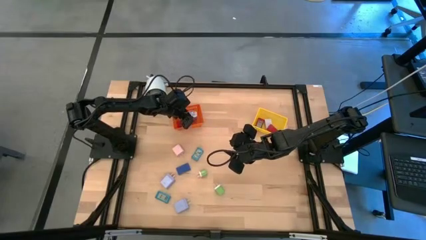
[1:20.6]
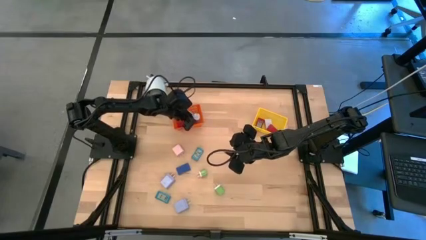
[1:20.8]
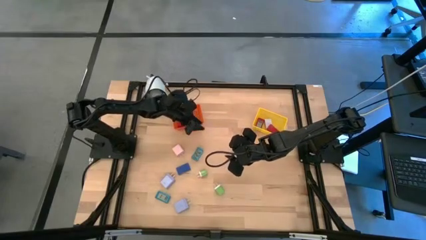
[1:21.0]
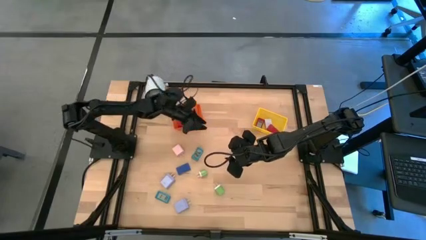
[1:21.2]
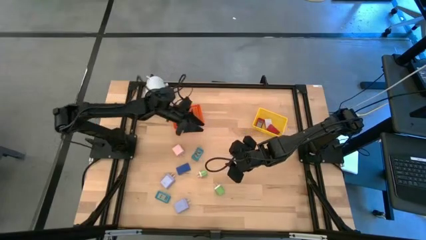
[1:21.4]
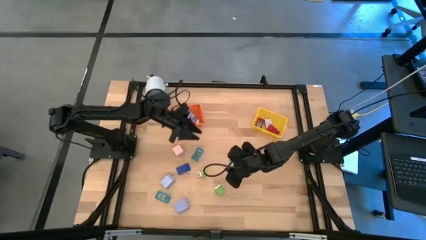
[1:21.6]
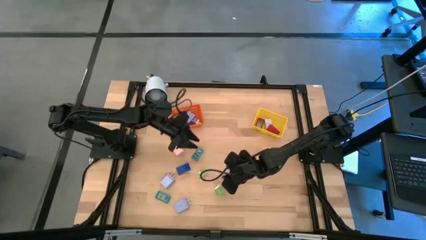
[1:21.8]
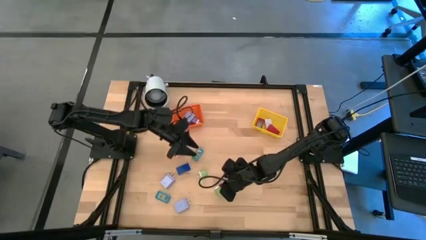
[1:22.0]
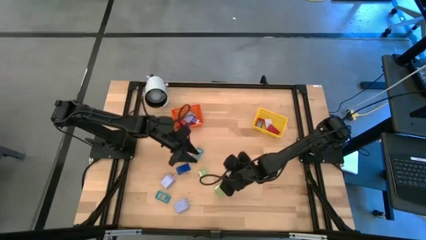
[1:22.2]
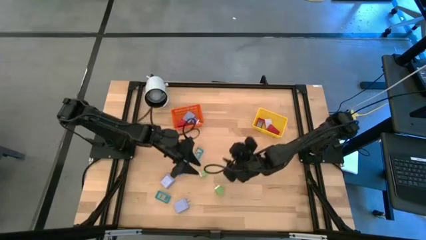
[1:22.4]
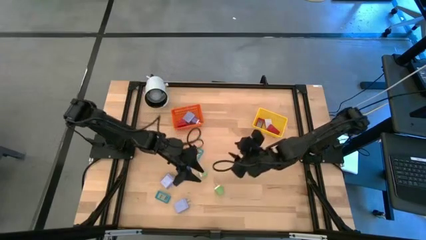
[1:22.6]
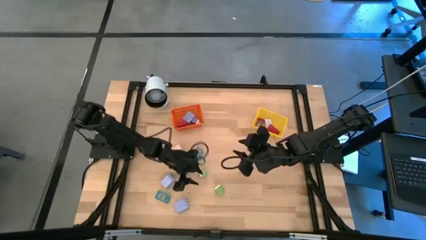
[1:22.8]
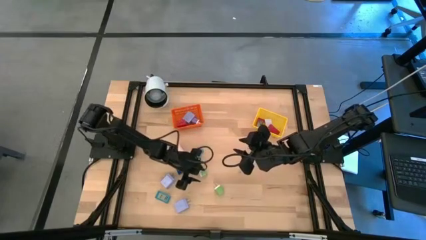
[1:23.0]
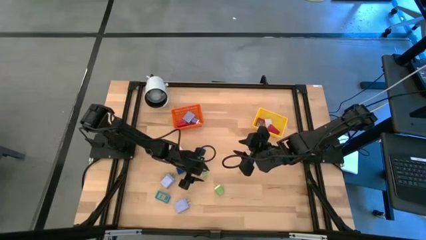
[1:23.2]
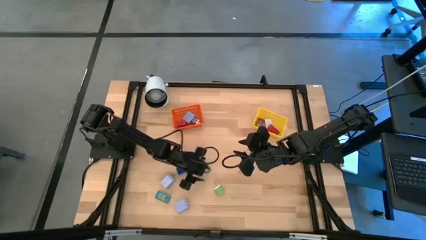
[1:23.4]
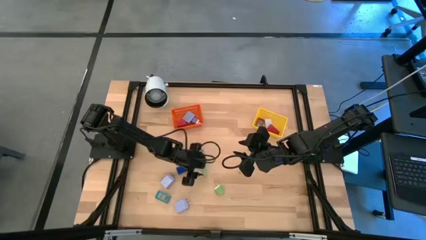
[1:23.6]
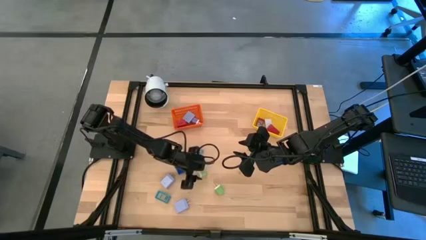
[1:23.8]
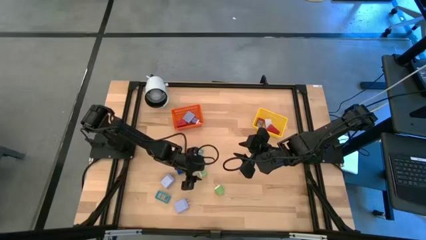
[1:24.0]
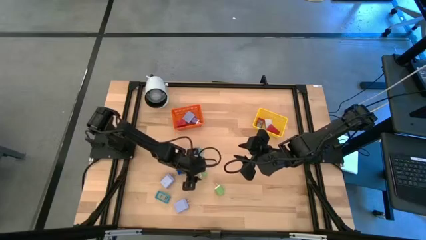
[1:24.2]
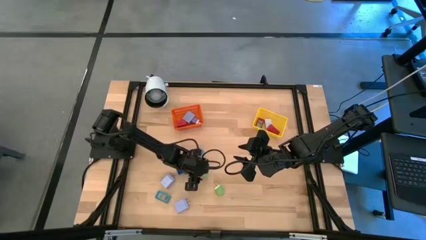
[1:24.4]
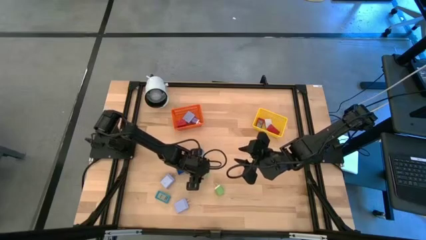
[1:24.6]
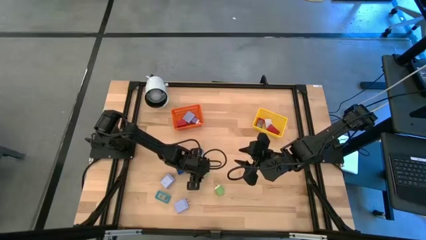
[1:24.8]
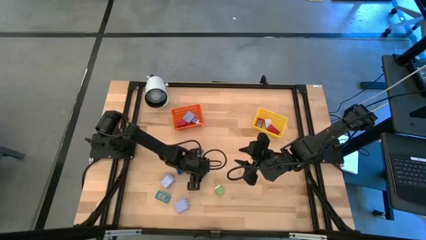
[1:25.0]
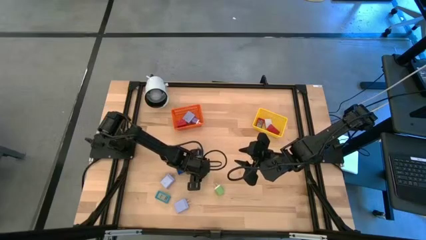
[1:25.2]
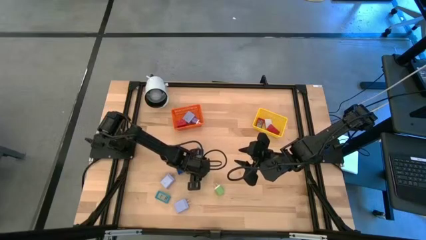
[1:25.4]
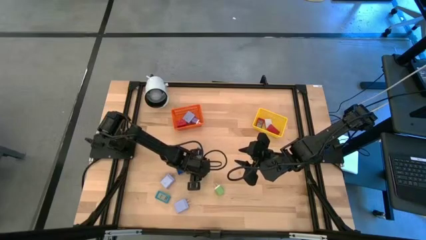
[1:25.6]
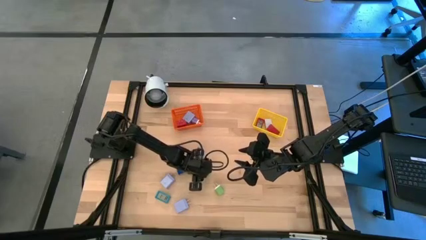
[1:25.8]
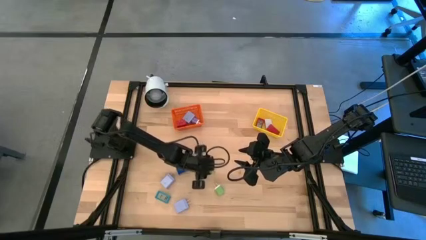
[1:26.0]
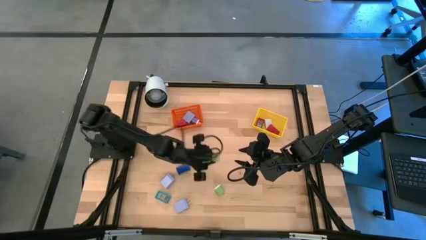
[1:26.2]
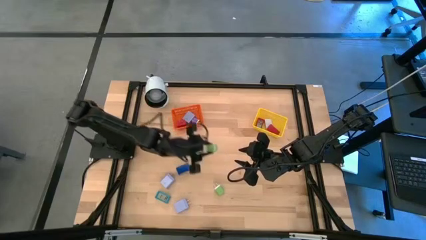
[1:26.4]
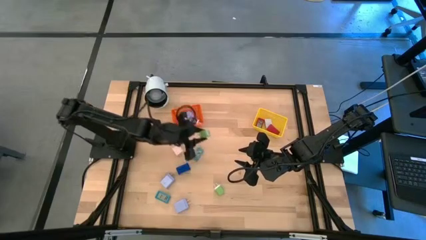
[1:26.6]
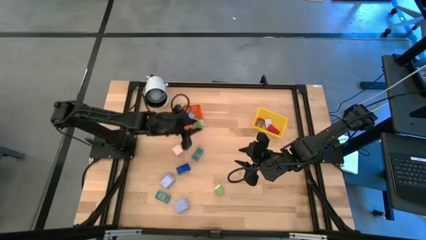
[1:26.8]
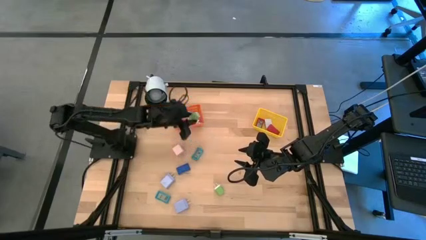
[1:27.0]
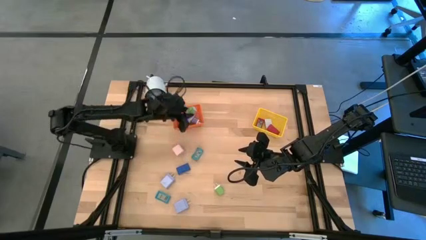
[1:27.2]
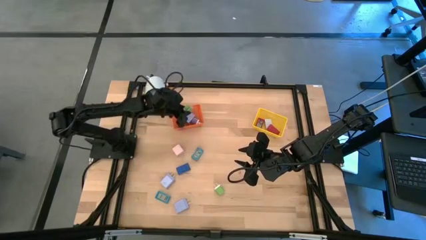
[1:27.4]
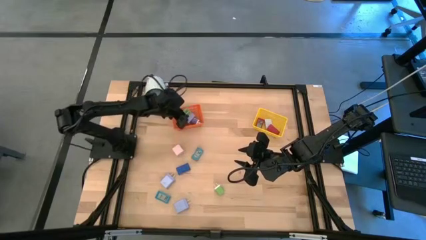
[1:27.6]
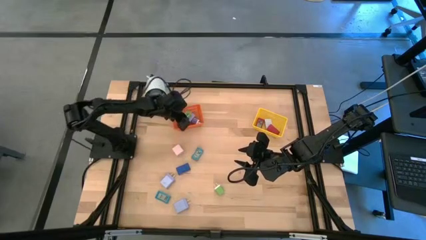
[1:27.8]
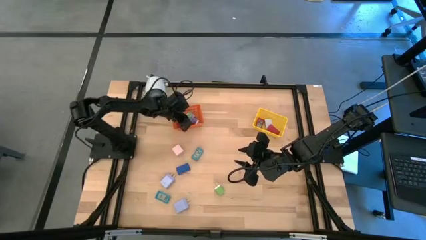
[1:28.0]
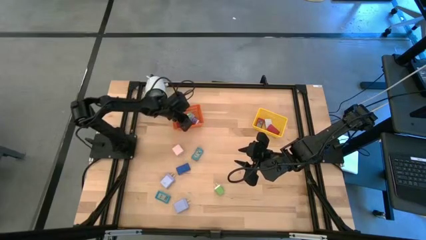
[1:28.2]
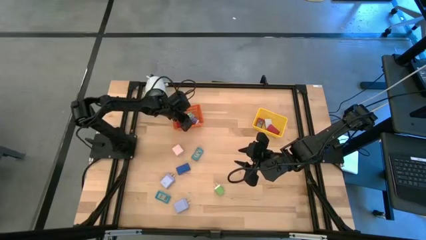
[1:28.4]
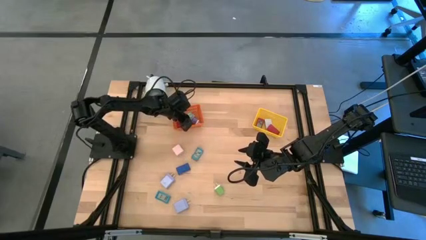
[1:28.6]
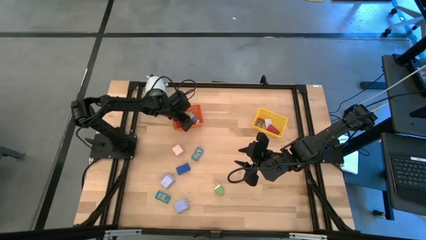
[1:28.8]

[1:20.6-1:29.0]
Task: Pick & Place Office items
Put the top green charger adapter into the orange bin

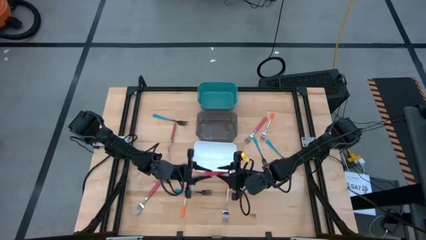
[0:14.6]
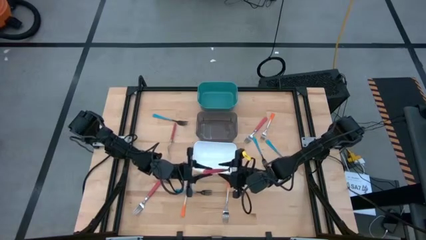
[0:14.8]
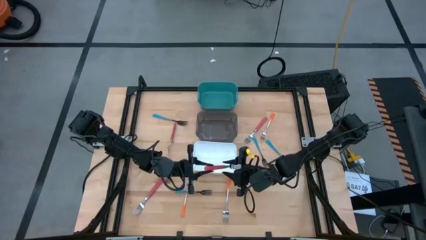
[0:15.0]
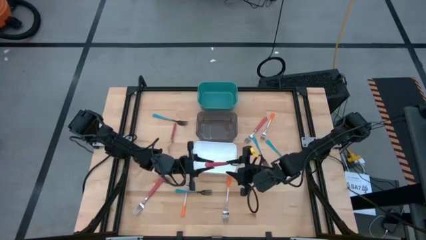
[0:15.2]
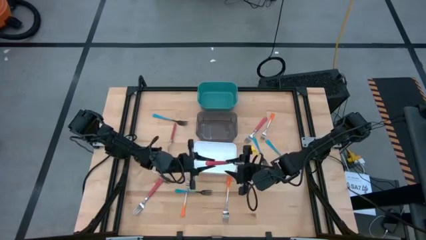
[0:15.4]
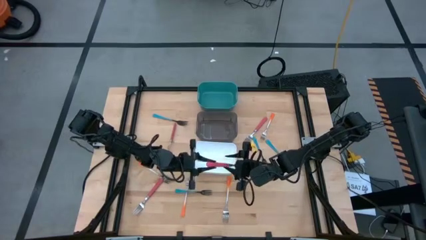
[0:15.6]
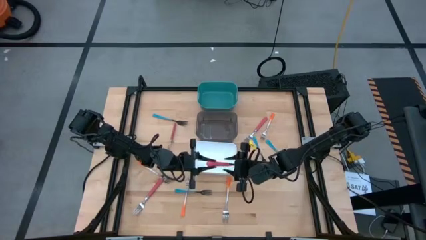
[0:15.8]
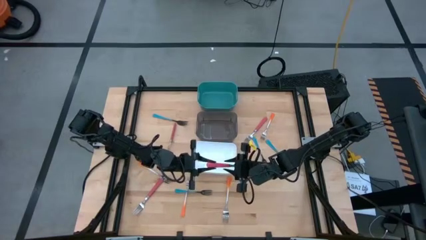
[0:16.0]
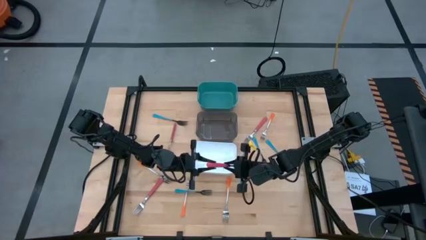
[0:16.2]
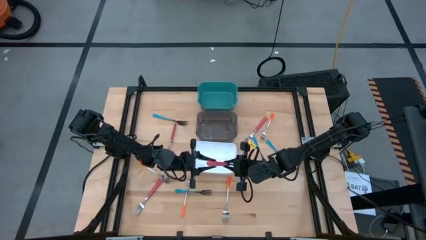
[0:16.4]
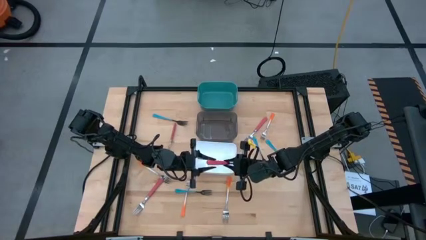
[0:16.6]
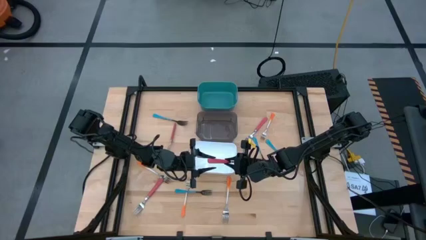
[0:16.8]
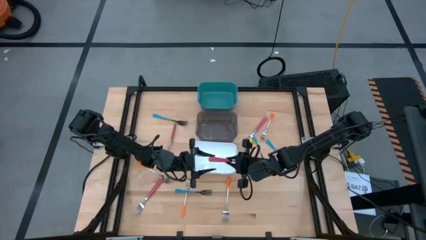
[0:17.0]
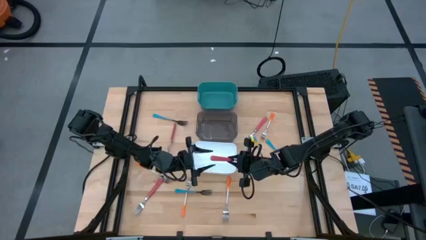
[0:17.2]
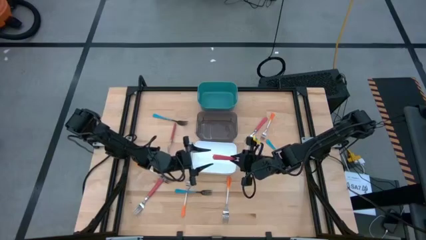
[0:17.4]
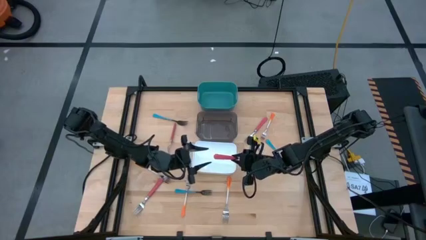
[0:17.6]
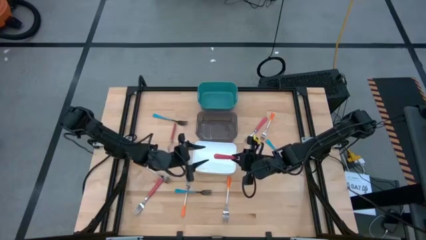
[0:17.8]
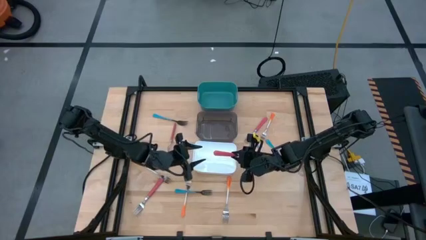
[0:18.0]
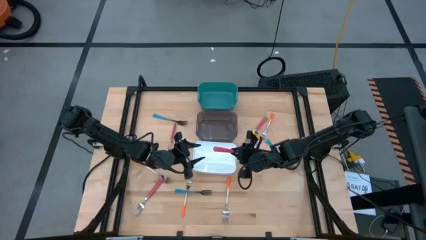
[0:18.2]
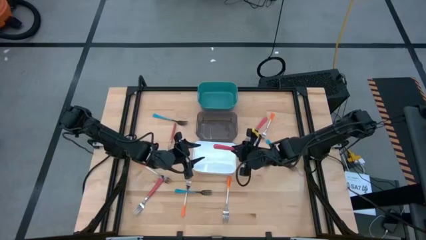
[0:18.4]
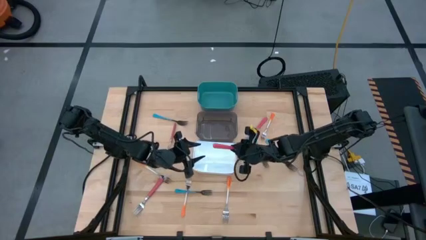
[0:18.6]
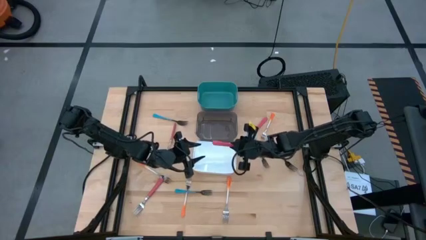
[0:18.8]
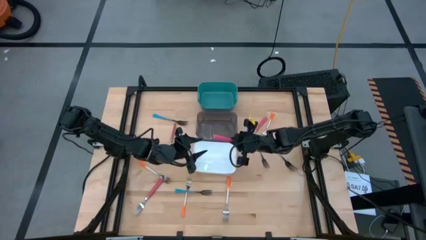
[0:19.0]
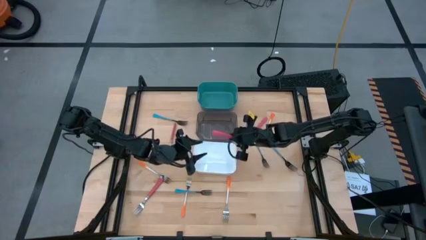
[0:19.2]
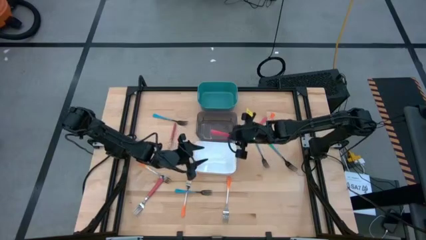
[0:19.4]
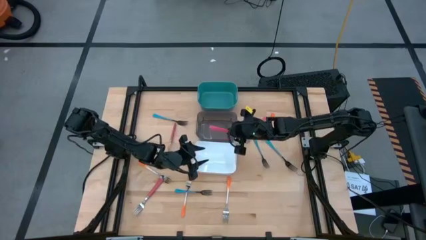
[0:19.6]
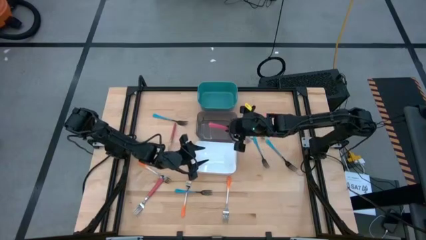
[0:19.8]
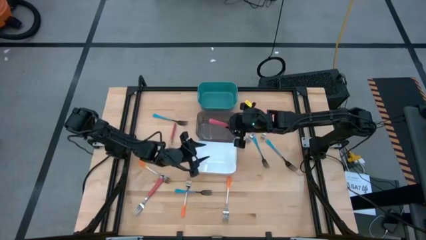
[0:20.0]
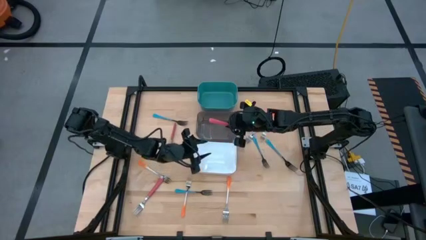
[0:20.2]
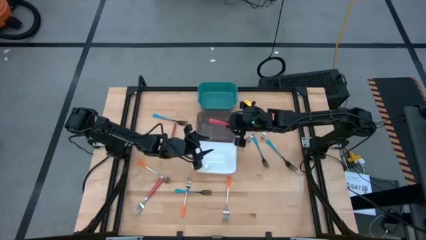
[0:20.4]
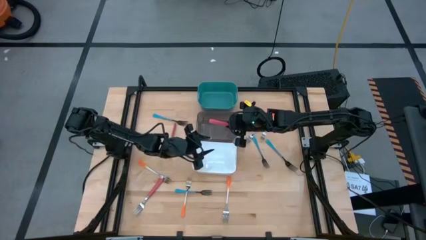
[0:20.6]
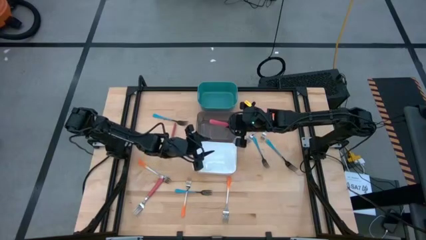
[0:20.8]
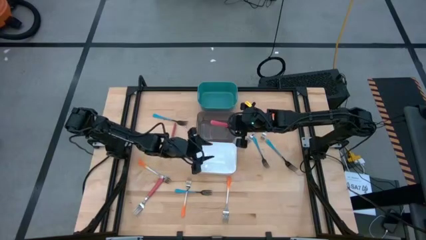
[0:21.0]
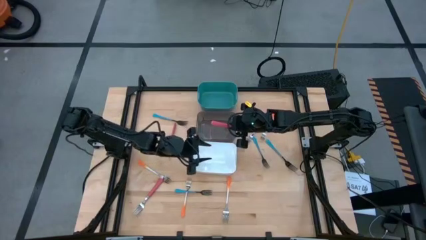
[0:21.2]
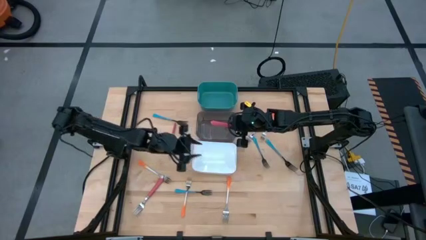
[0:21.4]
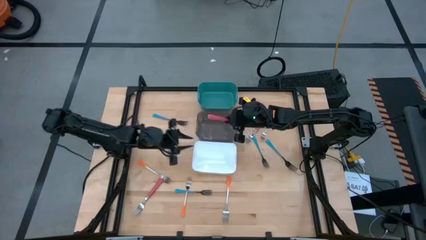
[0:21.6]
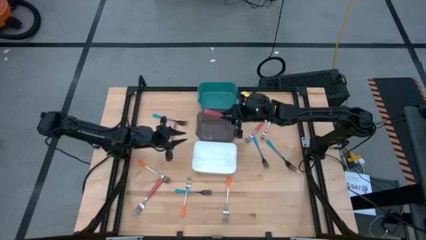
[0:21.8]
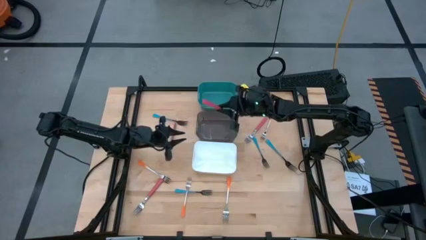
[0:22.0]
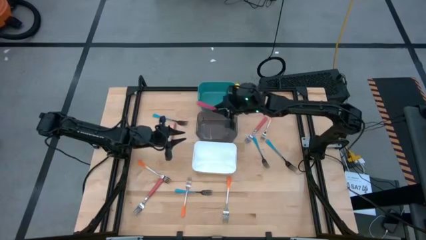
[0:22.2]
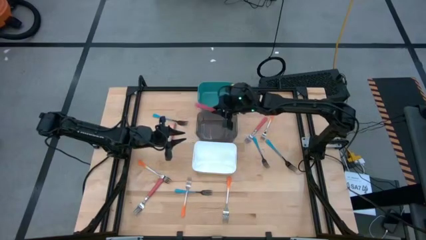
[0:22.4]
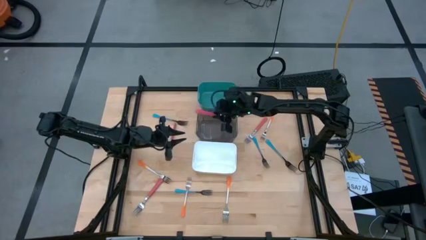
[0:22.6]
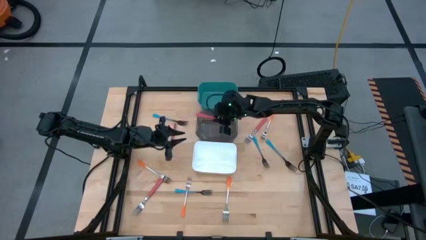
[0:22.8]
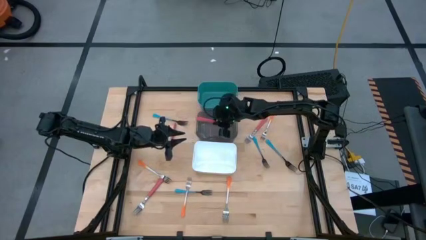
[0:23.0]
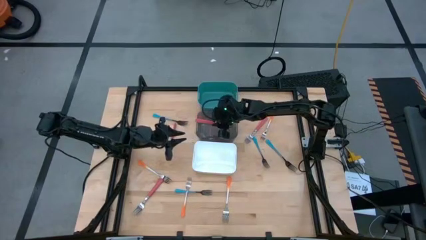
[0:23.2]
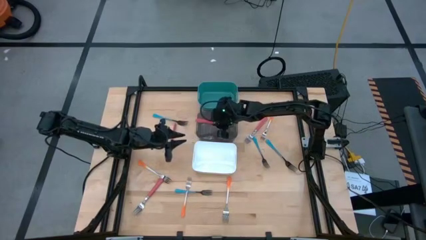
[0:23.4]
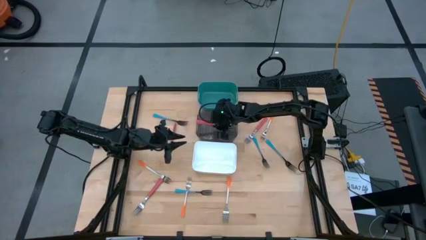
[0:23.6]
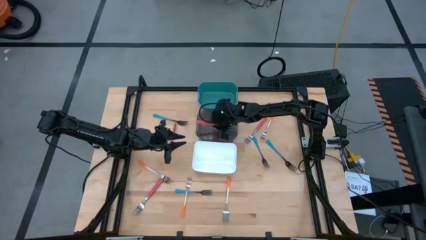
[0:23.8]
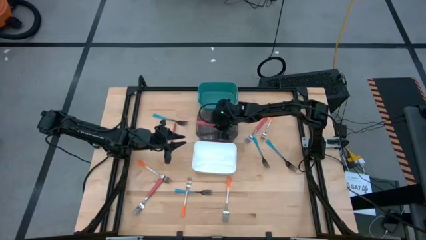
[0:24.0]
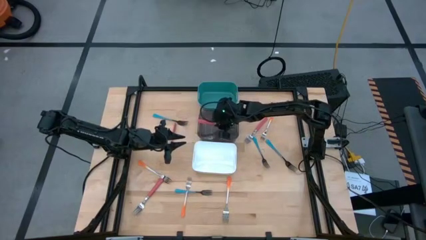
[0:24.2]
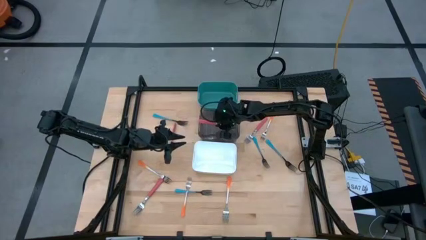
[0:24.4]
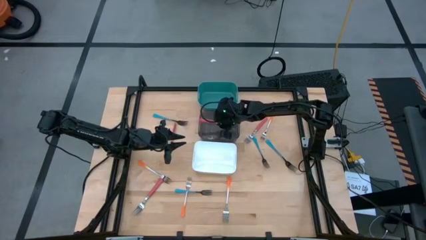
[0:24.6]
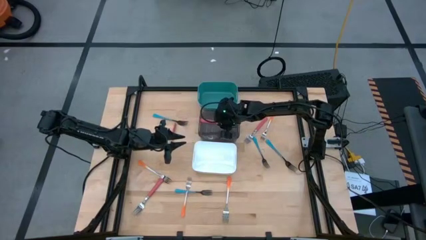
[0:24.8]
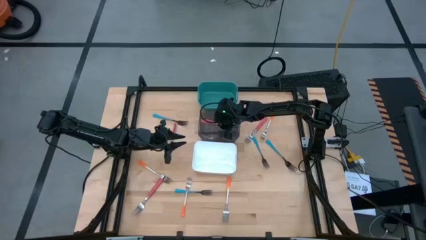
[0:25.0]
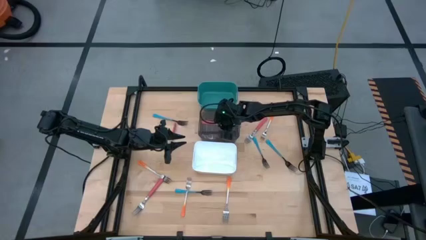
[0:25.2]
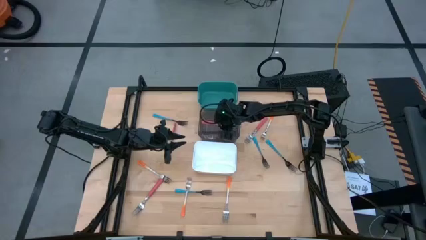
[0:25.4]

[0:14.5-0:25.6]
Task: Sort silverware by color (type)
Put the bottom right pink fork into the black bin
